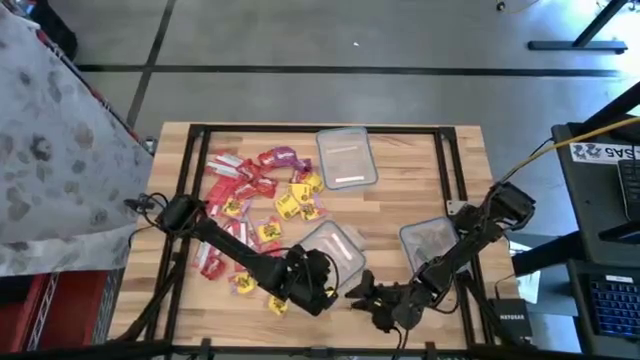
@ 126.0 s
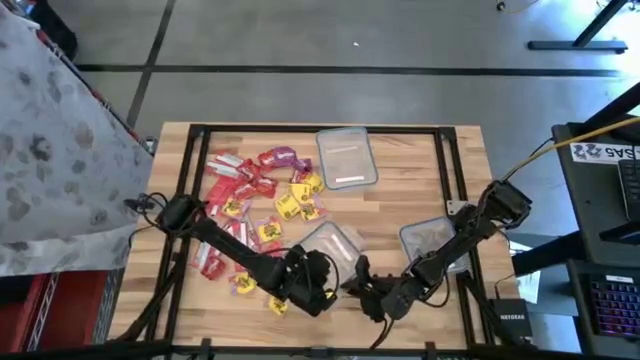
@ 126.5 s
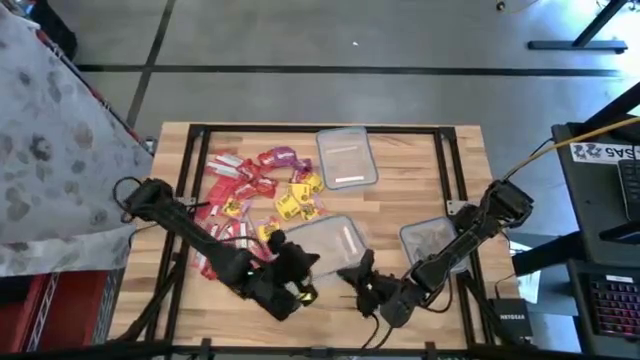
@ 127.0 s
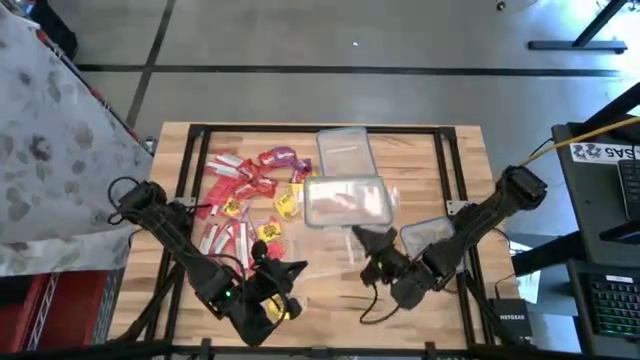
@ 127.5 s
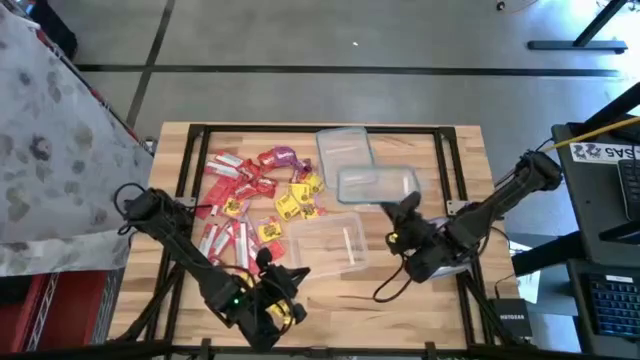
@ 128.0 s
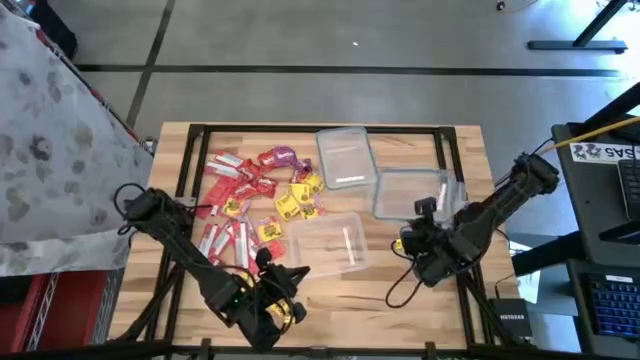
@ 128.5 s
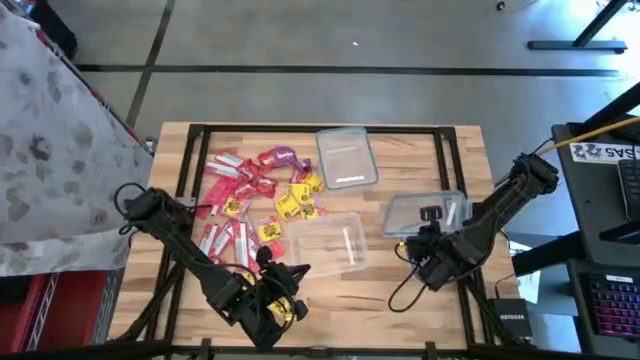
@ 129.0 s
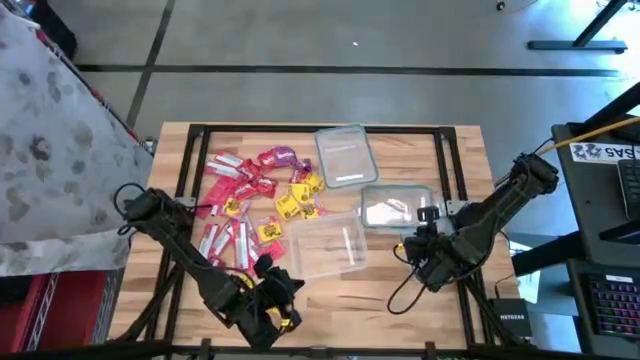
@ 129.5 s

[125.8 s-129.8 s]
Task: Sort candy
Open the top rectangular transparent food container

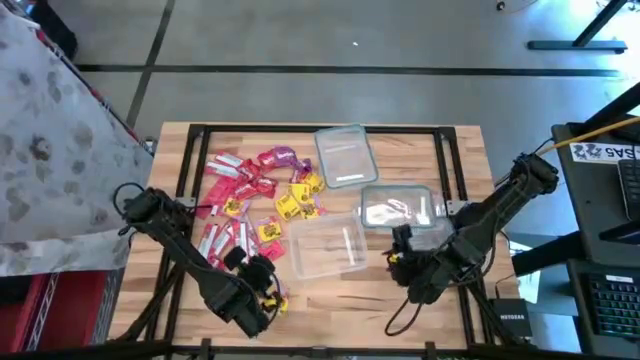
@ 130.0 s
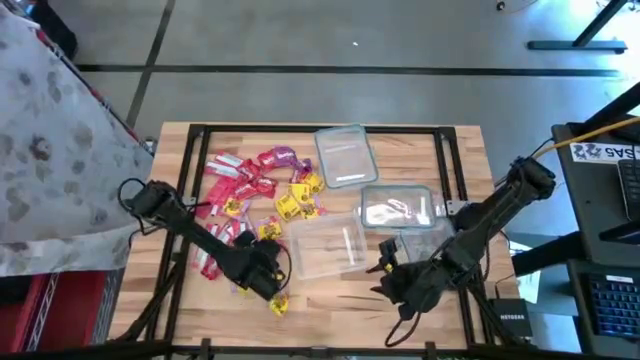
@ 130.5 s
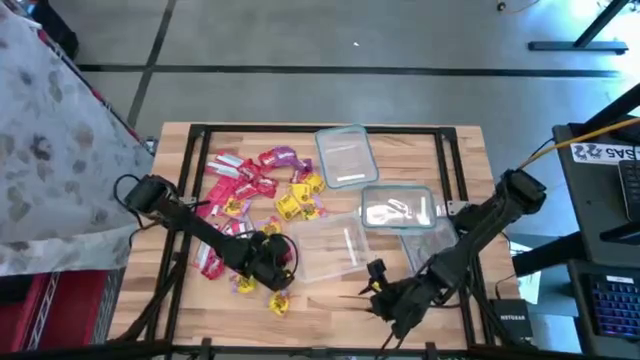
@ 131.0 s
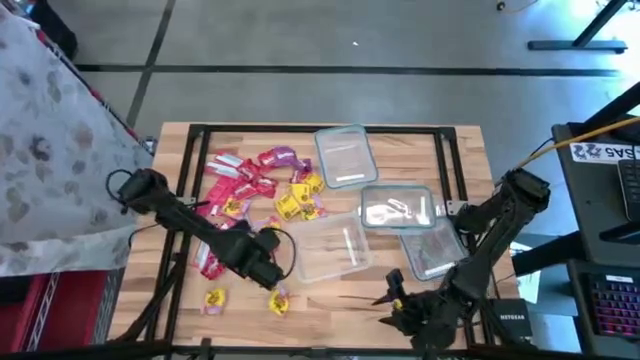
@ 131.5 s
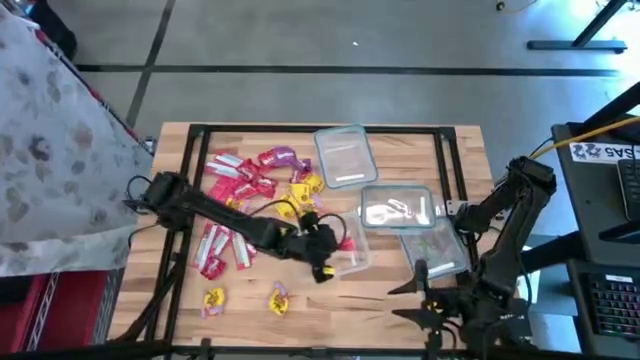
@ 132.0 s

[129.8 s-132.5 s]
Put the pink candy into the top rectangular transparent food container

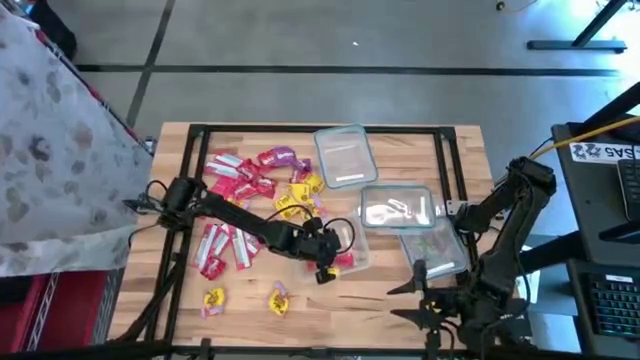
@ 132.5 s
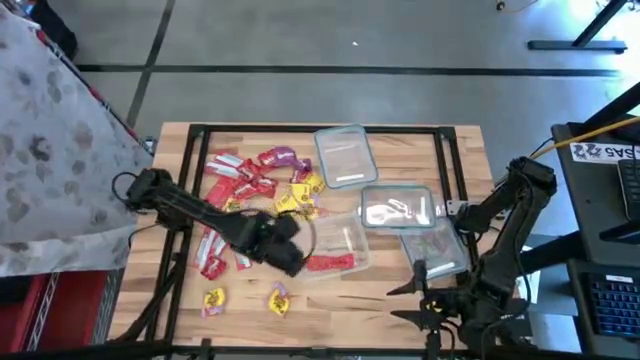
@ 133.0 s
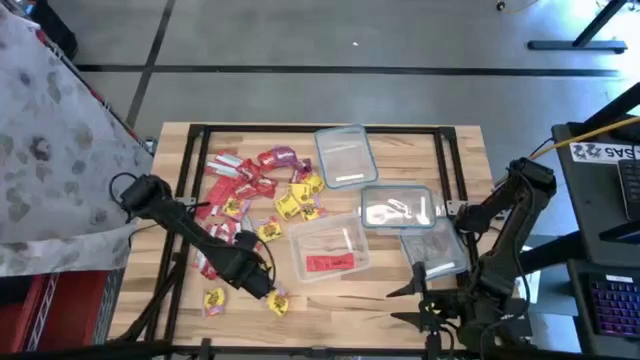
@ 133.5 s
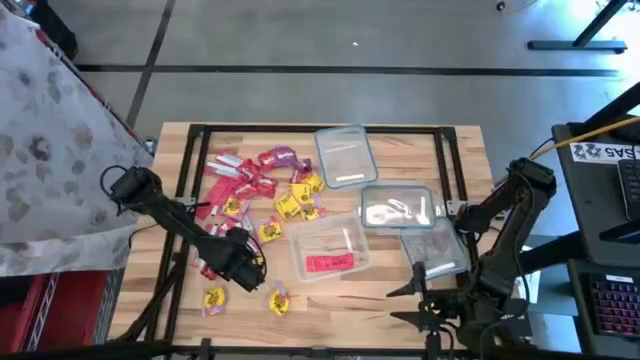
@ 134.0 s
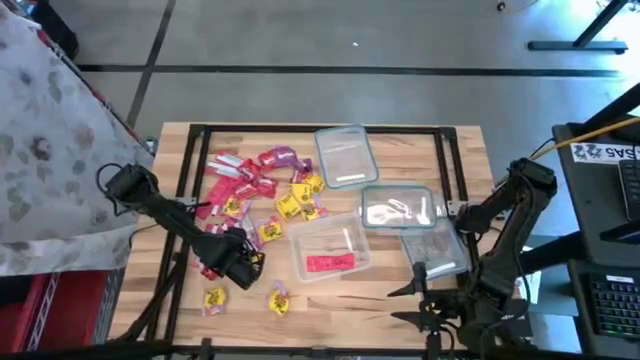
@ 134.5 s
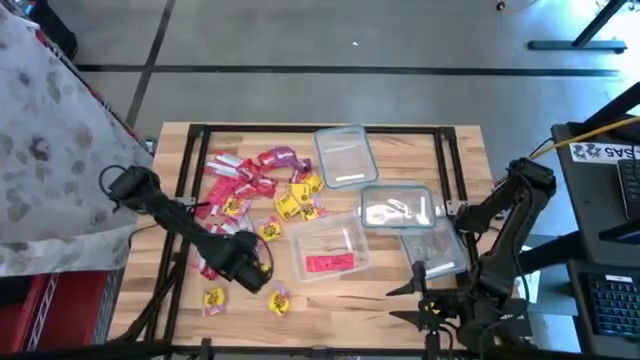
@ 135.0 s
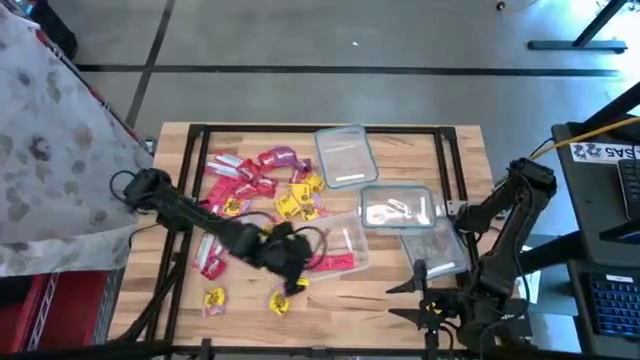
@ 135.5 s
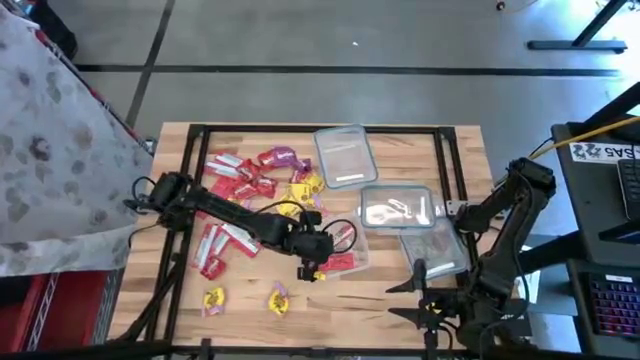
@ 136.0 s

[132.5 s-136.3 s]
Put the pink candy into the top rectangular transparent food container

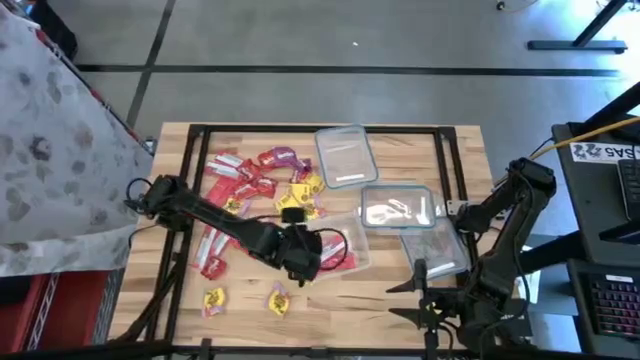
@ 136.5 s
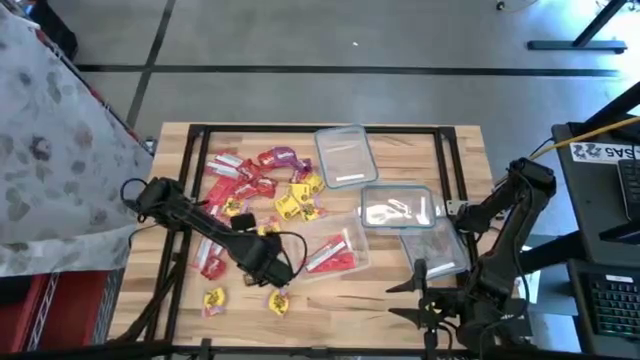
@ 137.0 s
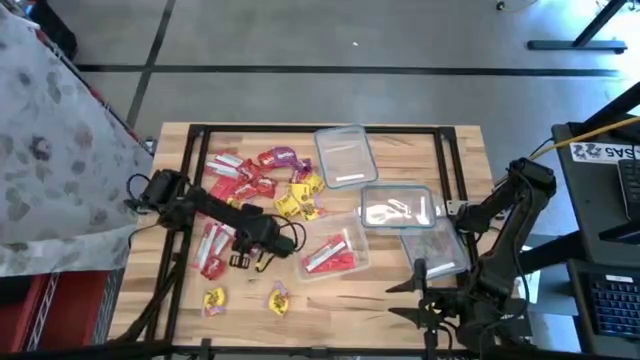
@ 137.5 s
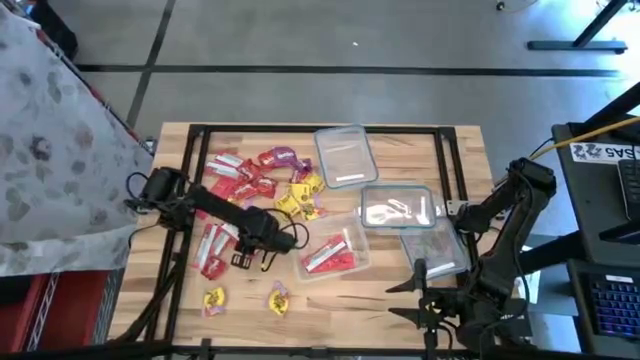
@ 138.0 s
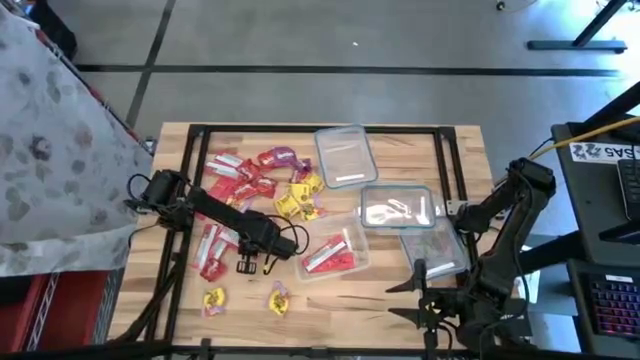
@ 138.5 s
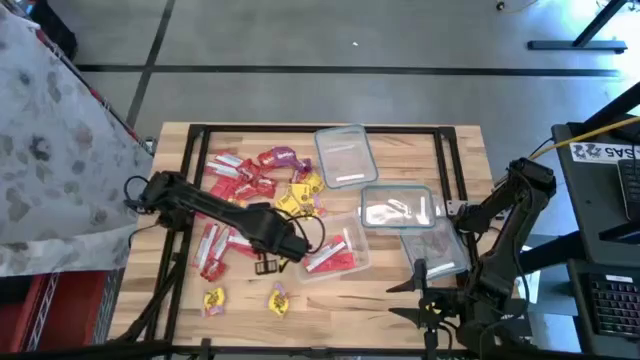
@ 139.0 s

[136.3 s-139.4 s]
Put the pink candy into top rectangular transparent food container

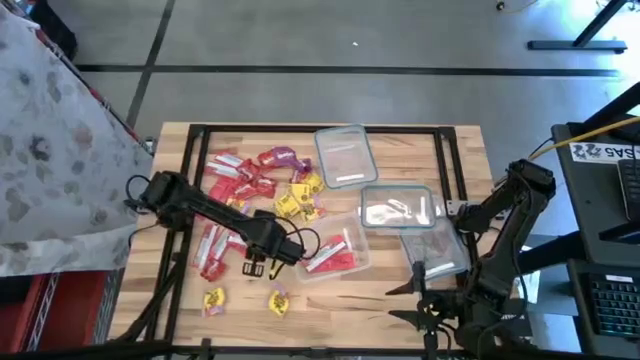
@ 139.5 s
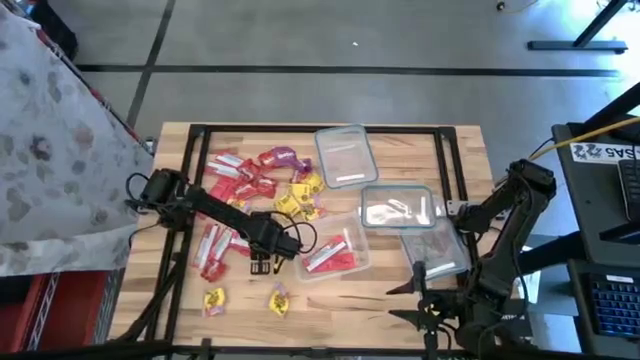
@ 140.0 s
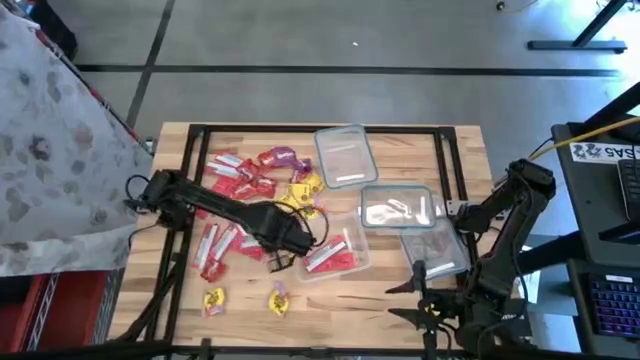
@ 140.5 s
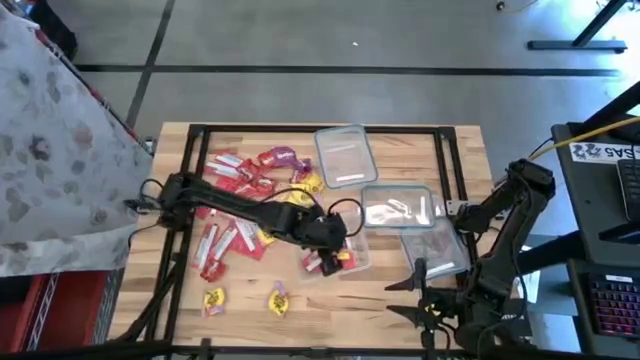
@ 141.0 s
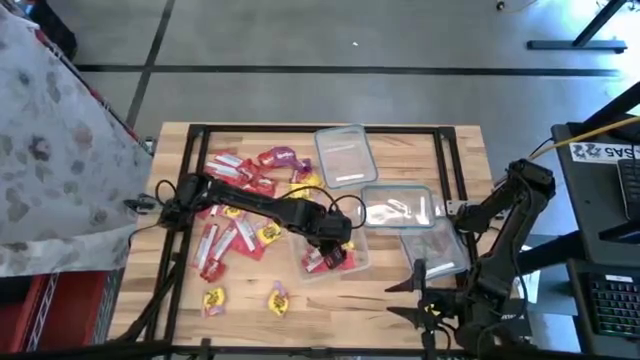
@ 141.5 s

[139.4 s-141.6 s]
Put the pink candy into the top rectangular transparent food container

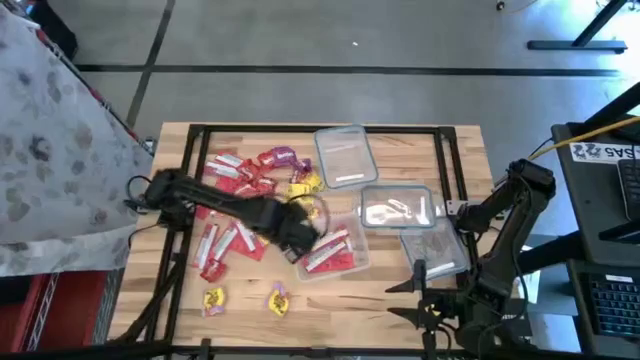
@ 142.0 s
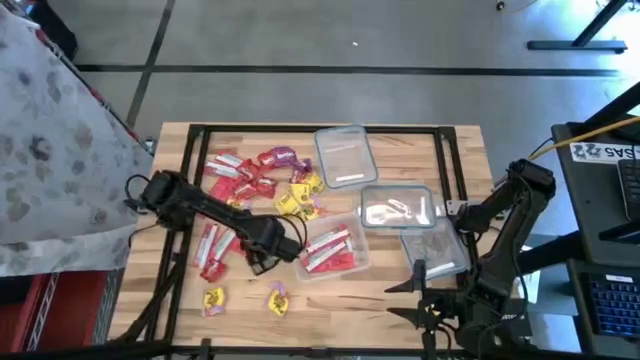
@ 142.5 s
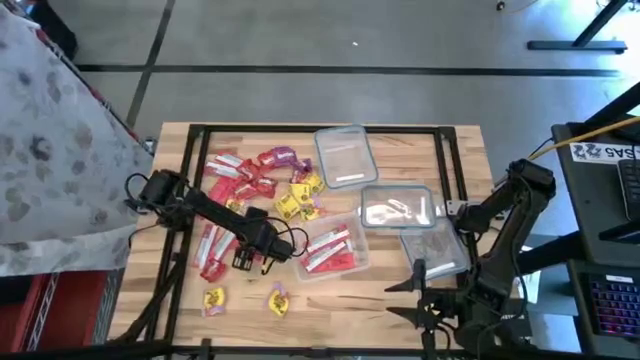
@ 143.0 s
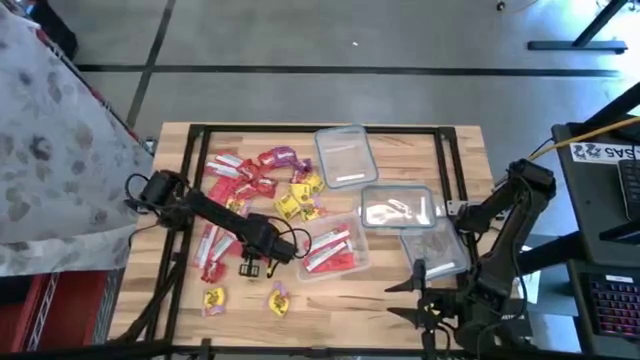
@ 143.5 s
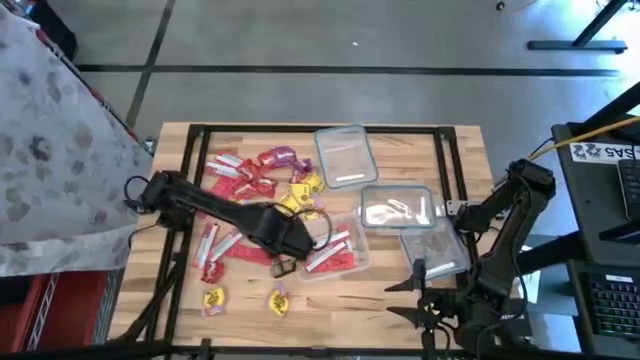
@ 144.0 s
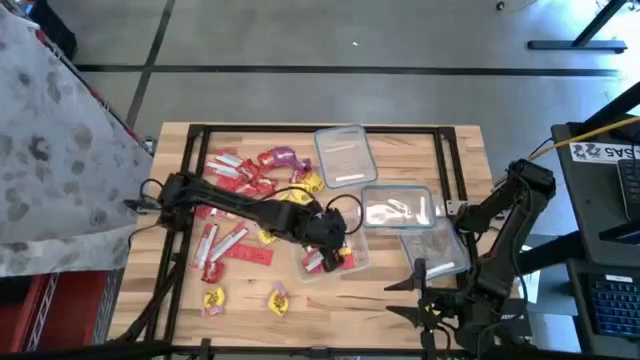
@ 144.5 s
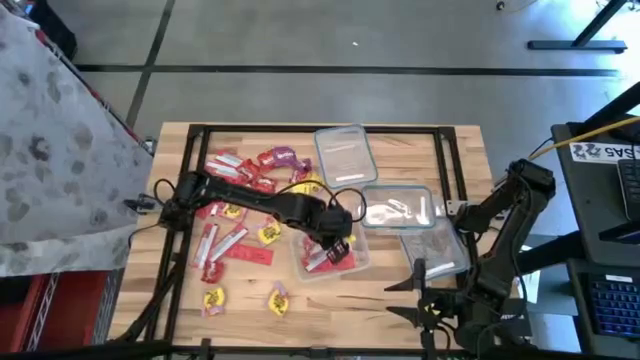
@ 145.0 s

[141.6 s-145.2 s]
Put the pink candy into the top rectangular transparent food container

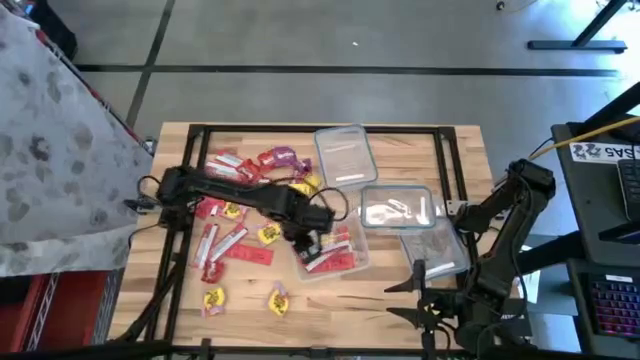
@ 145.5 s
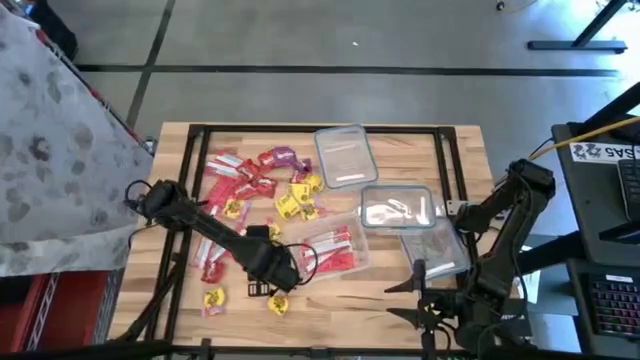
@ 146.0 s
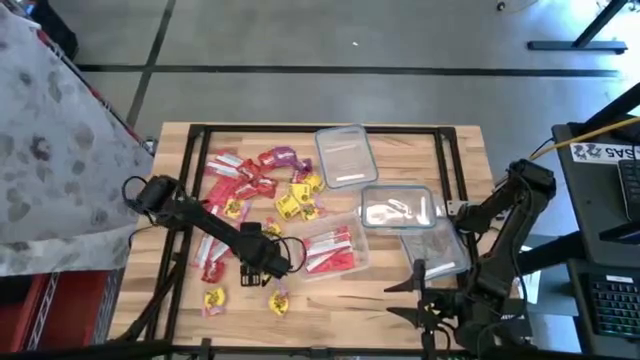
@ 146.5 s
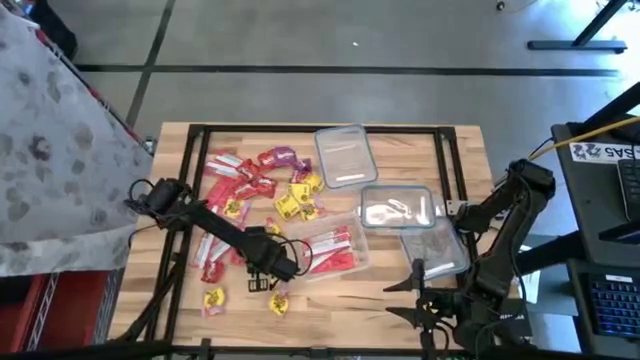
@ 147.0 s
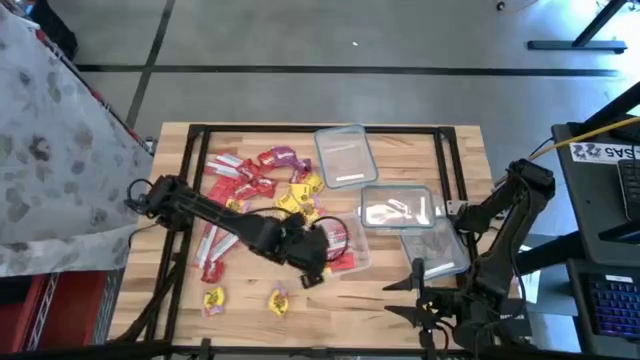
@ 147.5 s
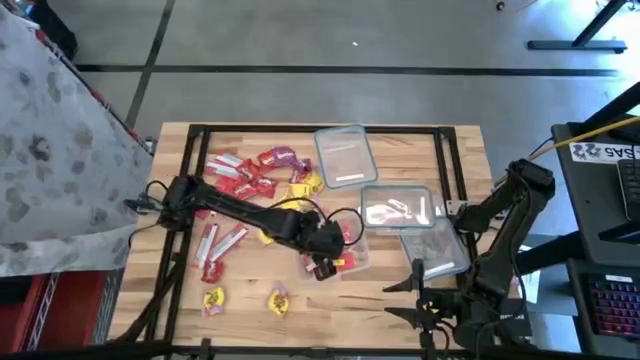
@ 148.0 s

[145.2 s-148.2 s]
Put the pink candy into the top rectangular transparent food container
